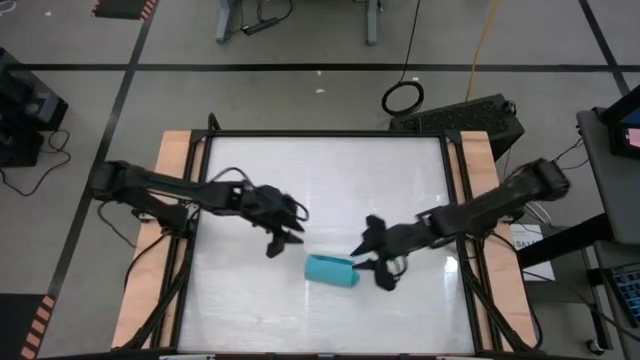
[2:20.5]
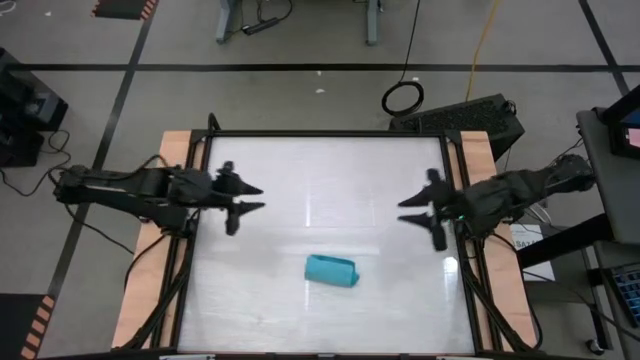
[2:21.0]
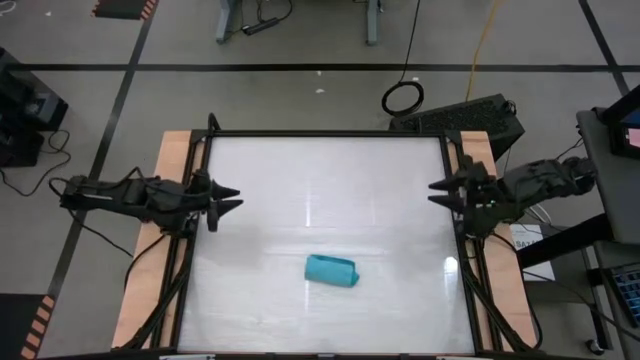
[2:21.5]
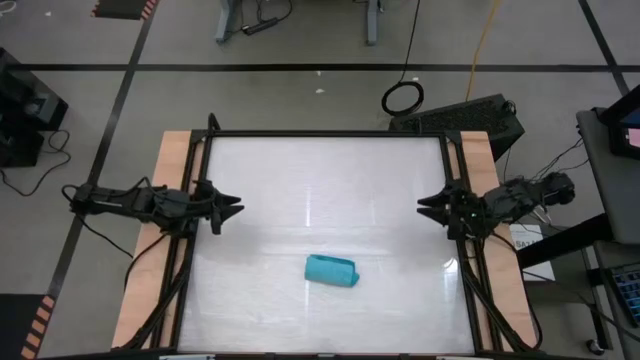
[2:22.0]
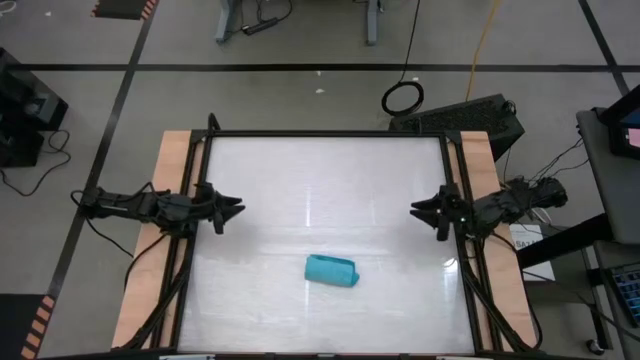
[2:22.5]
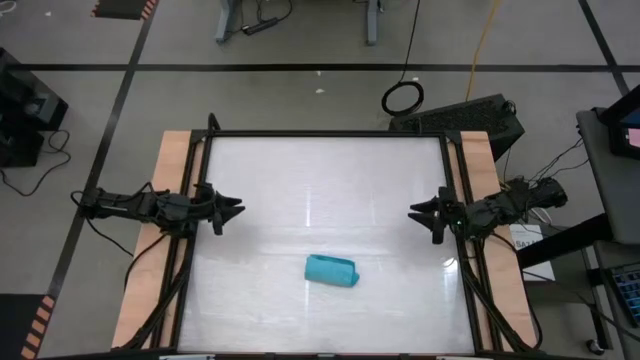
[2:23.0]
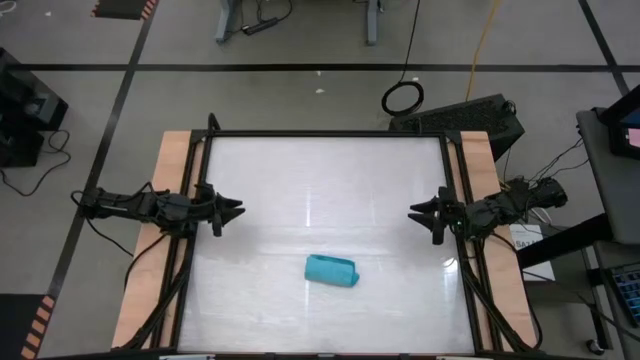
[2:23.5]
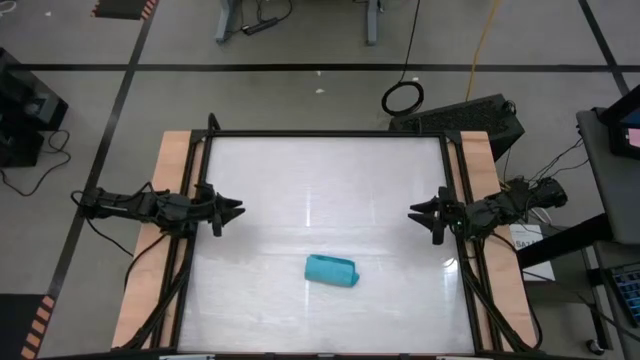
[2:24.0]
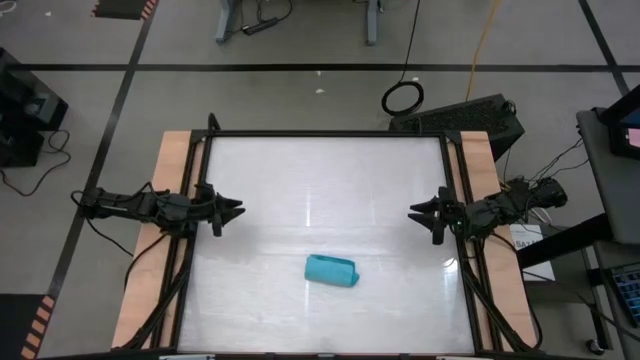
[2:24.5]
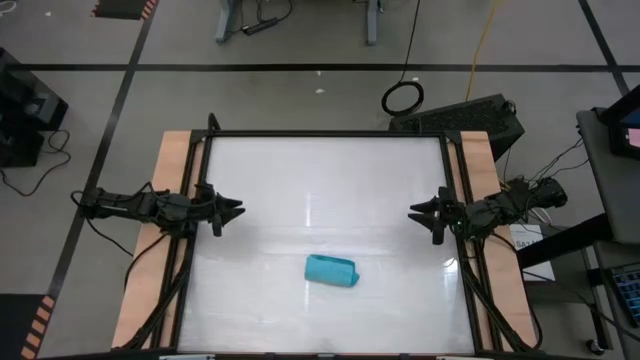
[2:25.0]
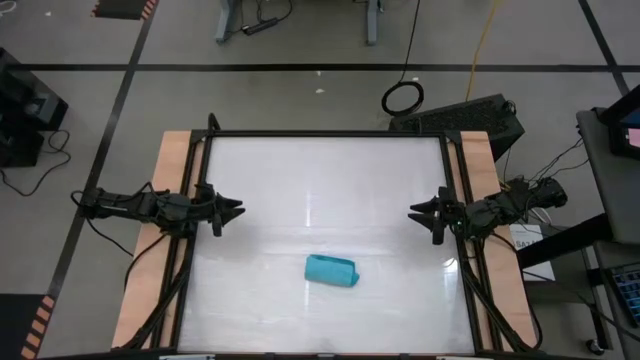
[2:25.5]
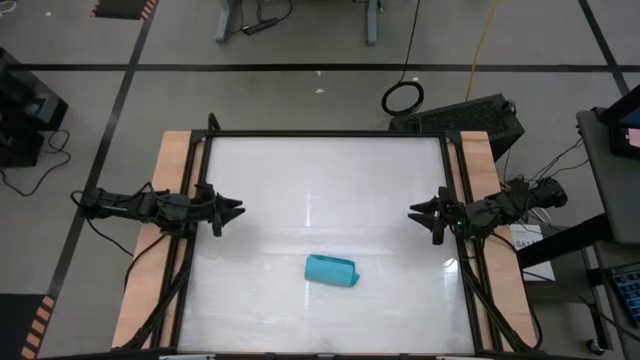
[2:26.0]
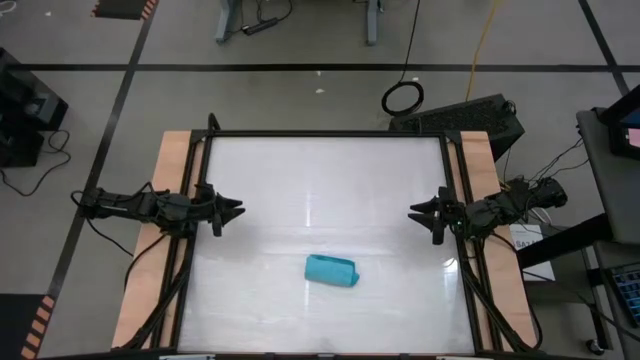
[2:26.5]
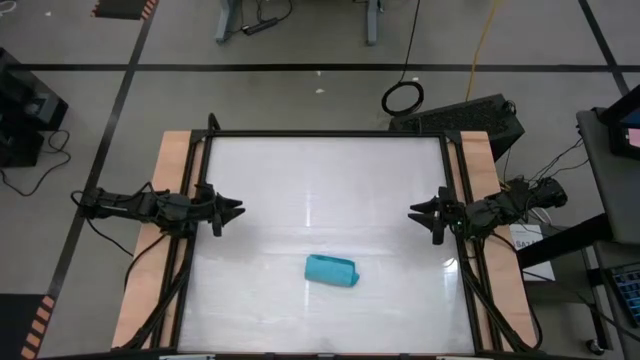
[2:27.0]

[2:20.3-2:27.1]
Task: Roll towel
Return to Home Position

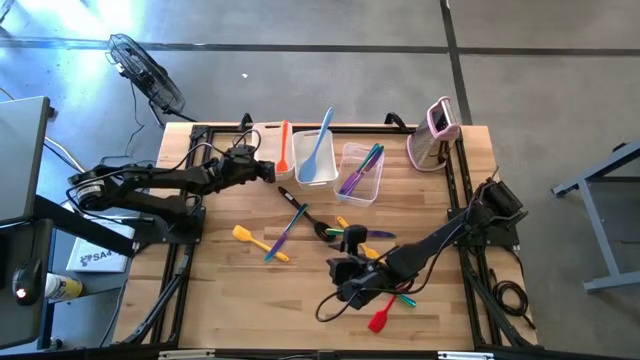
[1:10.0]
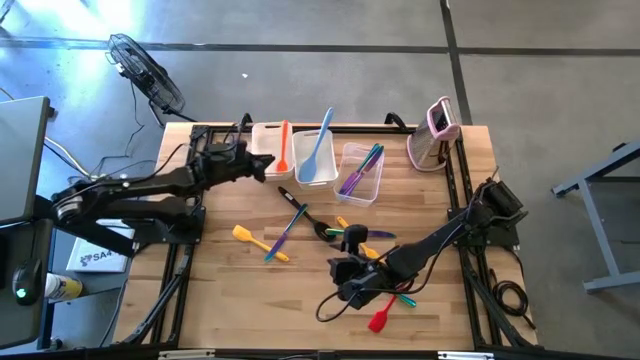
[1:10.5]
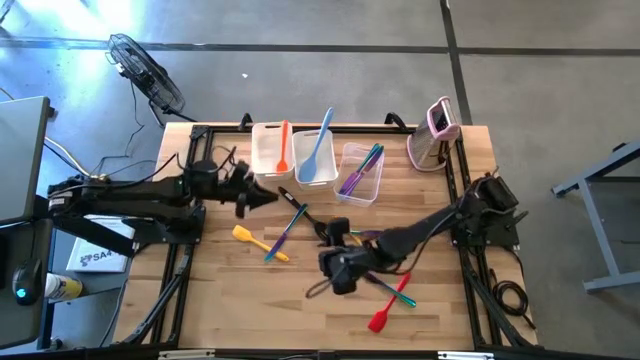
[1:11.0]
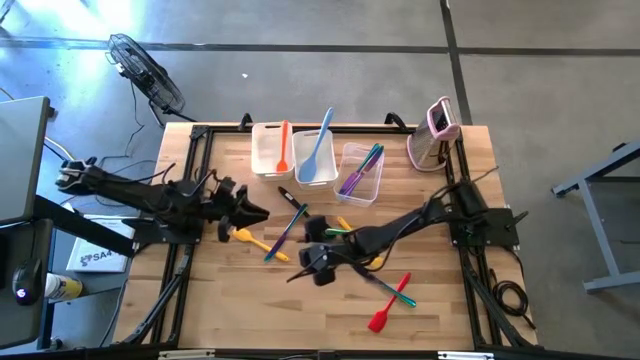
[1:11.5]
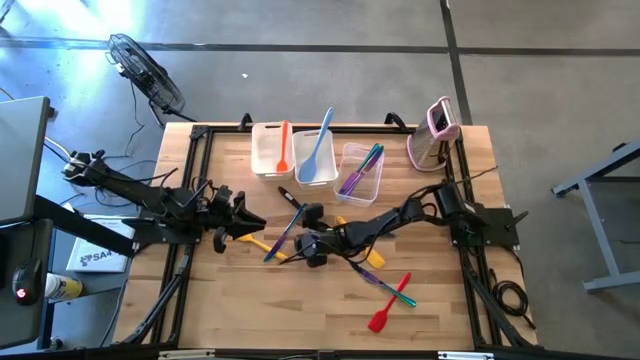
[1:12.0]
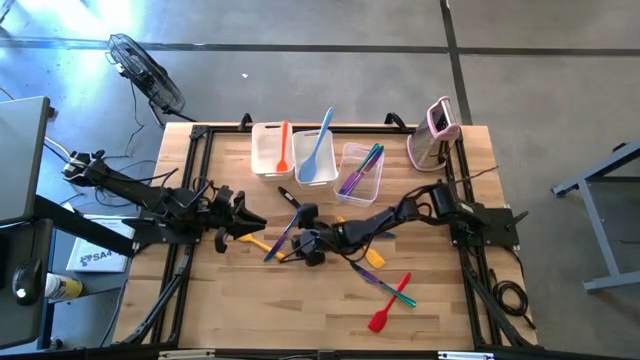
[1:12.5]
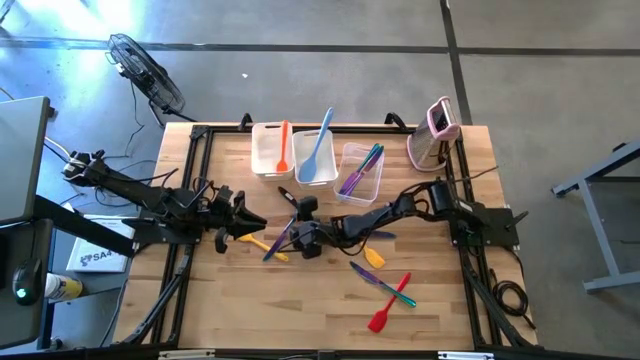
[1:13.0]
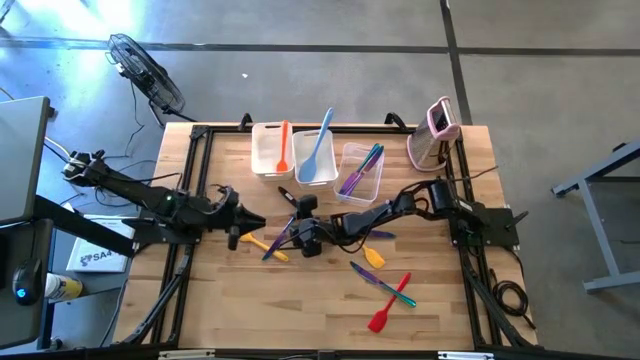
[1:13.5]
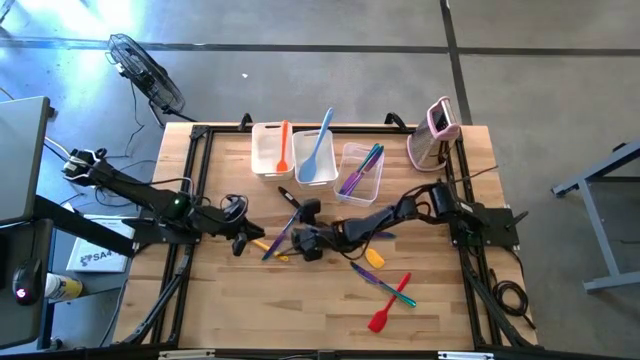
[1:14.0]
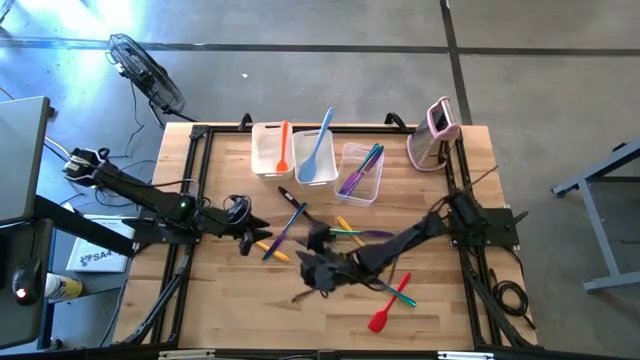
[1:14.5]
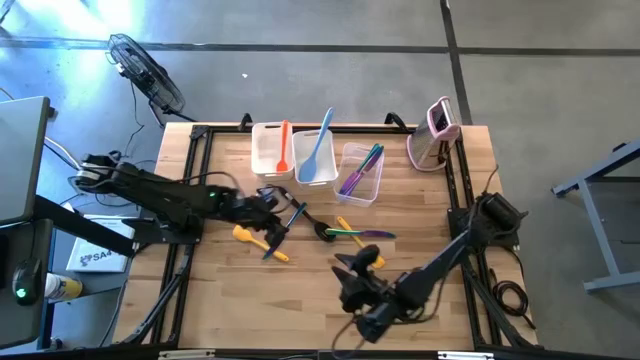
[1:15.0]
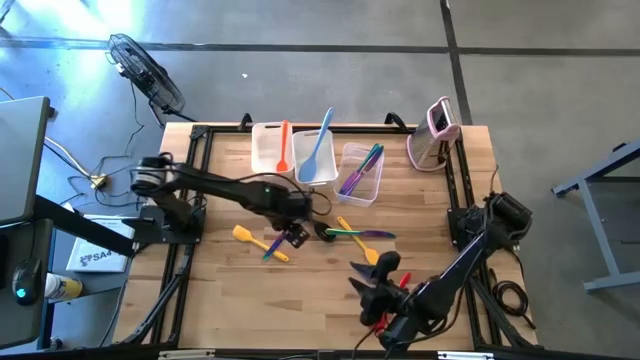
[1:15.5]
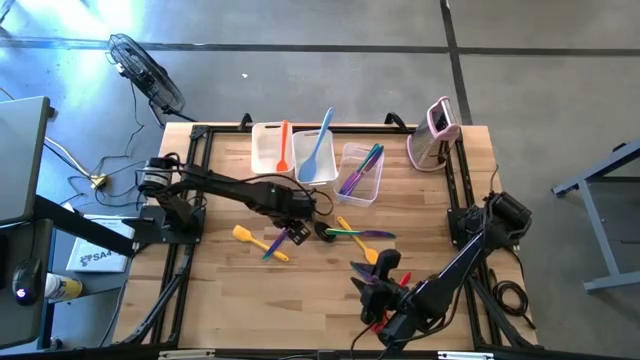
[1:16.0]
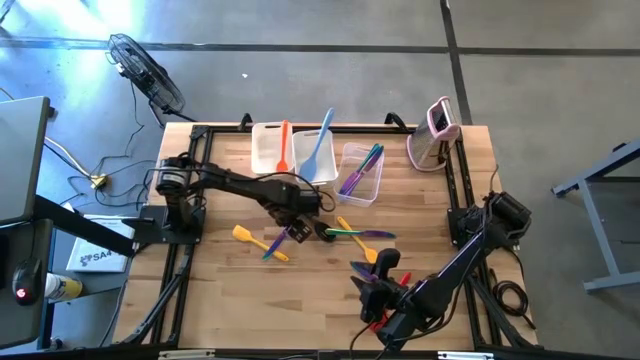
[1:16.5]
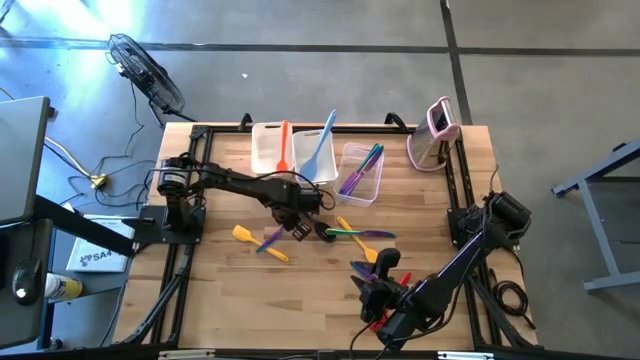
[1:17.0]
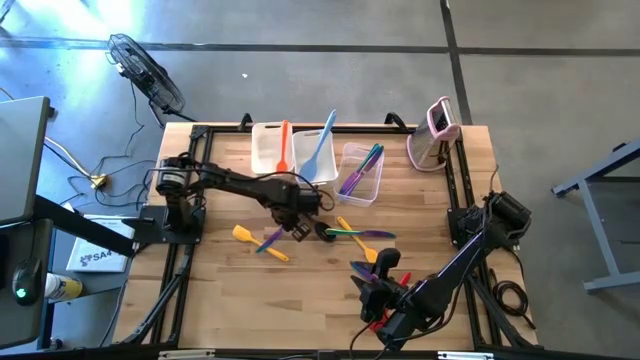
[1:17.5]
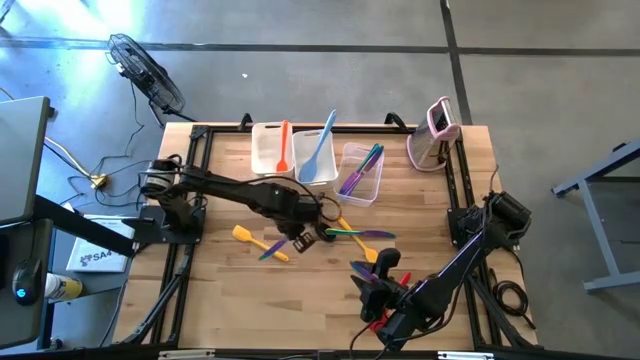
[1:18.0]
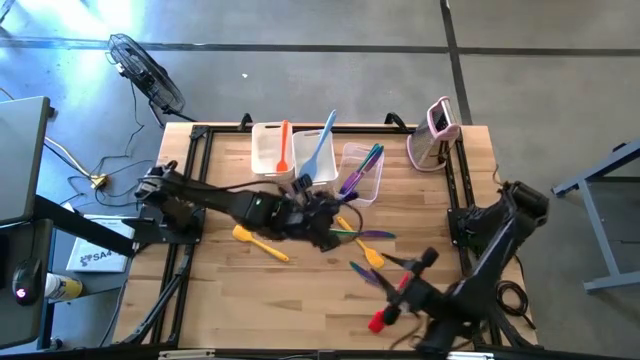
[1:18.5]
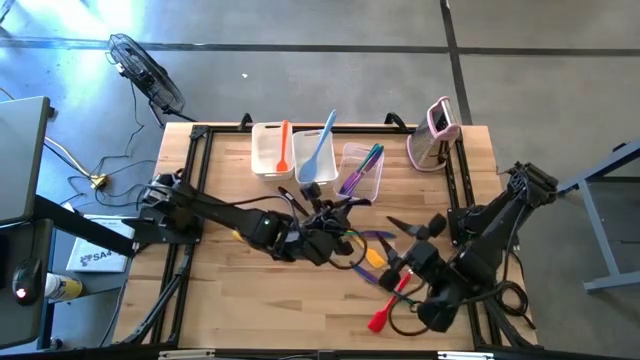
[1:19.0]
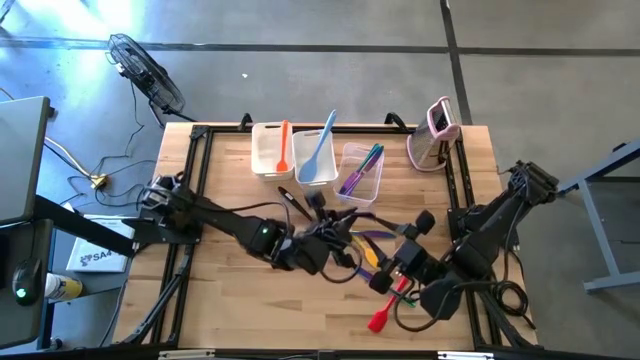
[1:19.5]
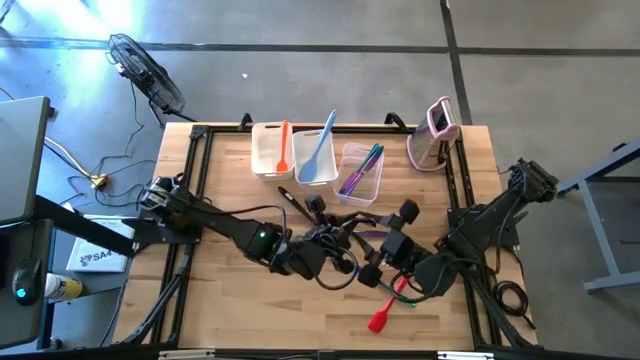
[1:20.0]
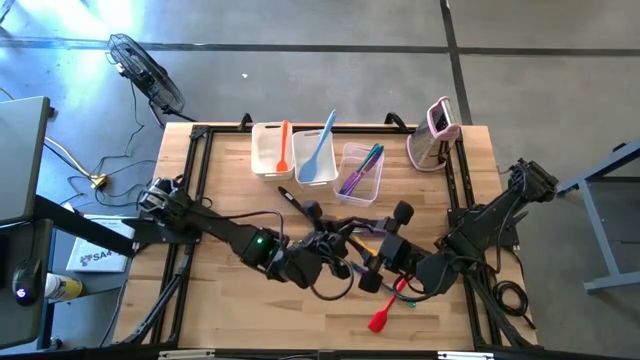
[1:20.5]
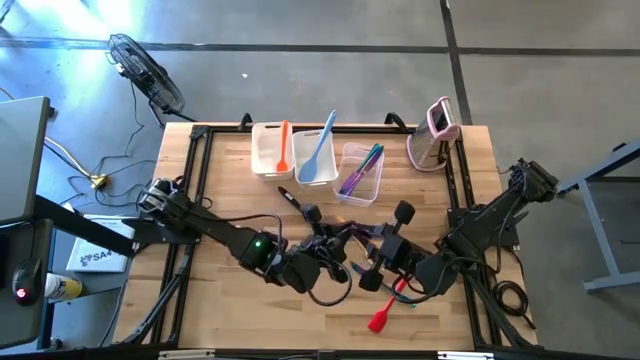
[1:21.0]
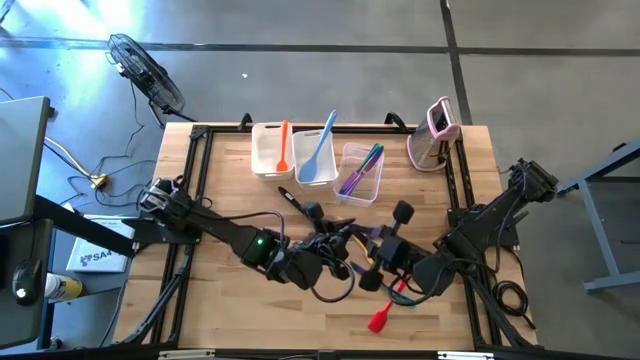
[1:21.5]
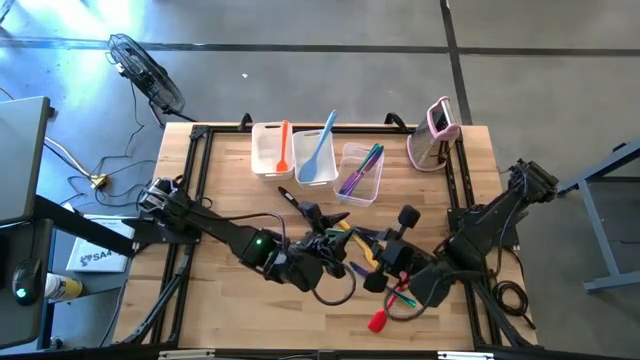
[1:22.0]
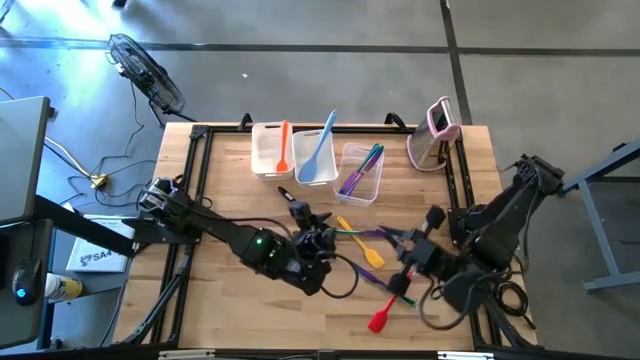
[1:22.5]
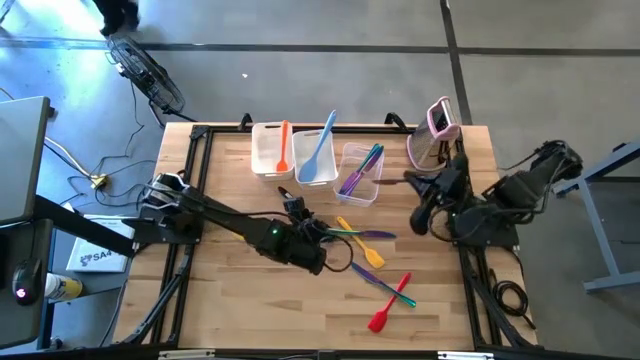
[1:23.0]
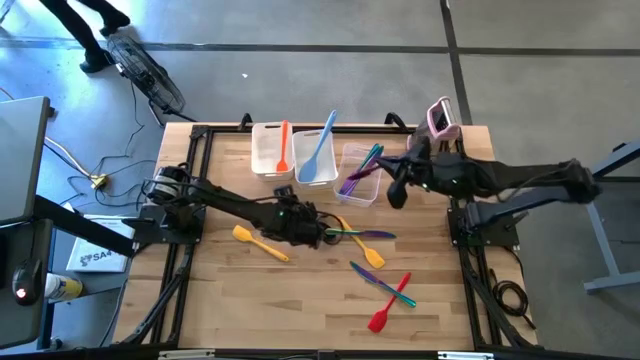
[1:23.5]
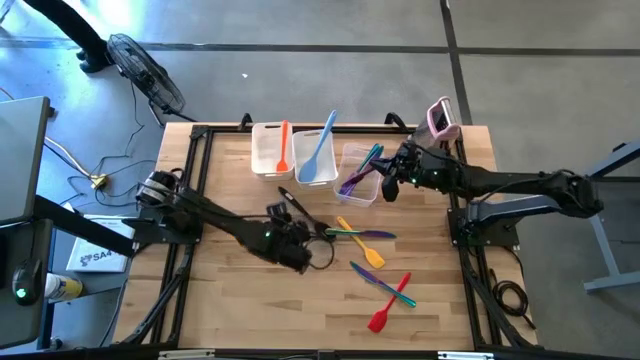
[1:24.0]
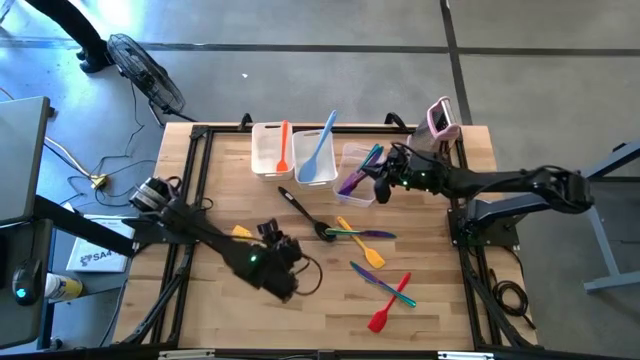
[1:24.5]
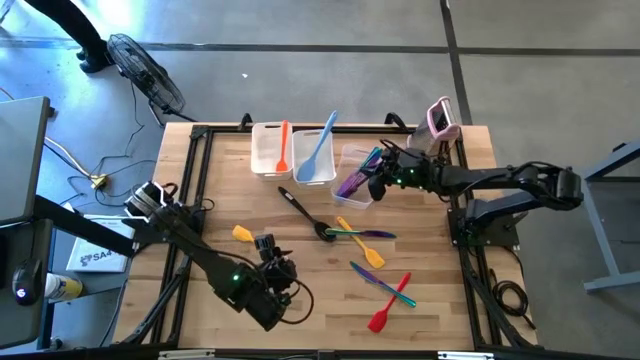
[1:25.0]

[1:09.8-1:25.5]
Task: Pick & Place Kitchen Items
Put the purple table knife into the transparent bin
